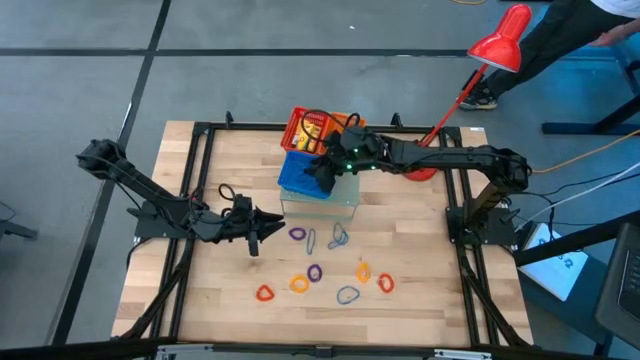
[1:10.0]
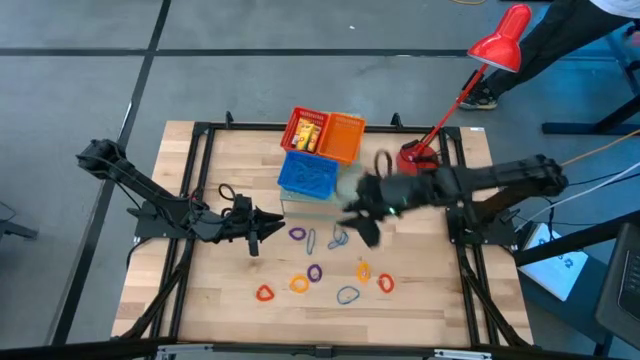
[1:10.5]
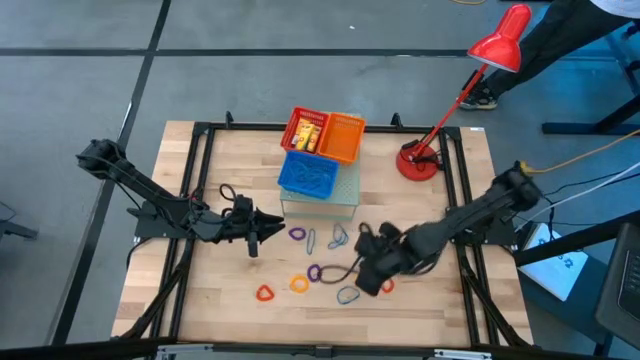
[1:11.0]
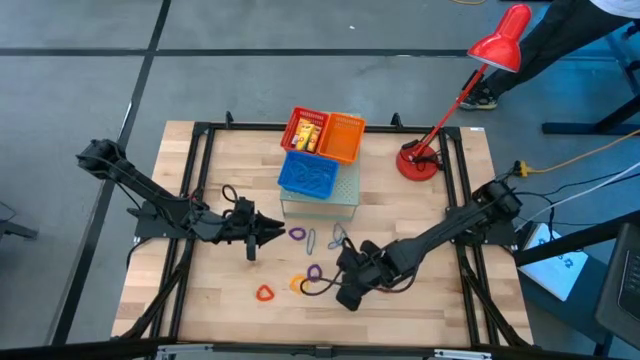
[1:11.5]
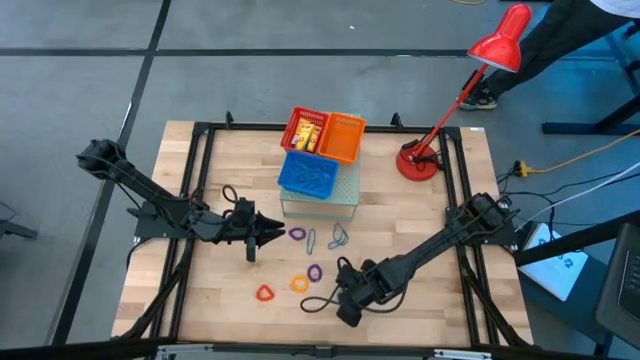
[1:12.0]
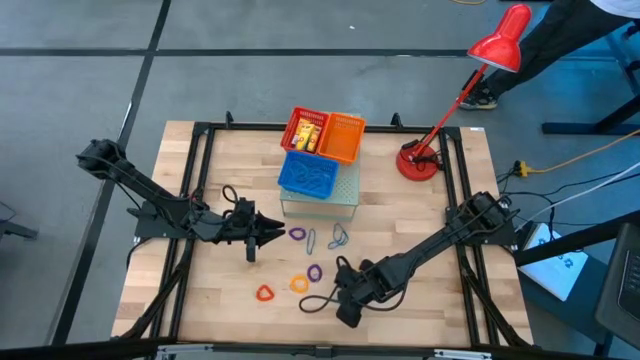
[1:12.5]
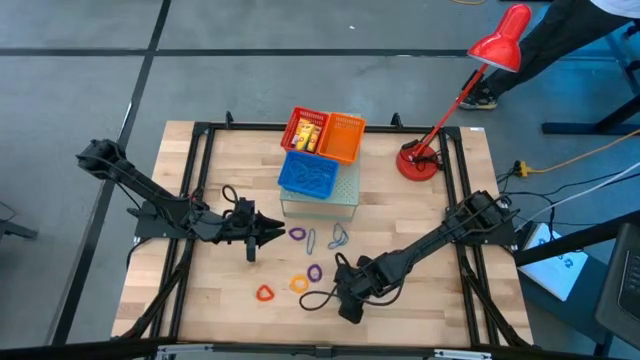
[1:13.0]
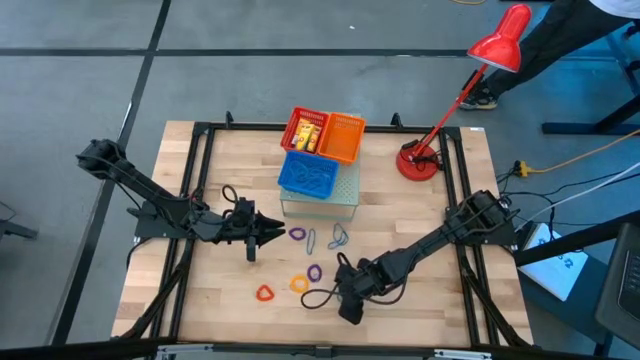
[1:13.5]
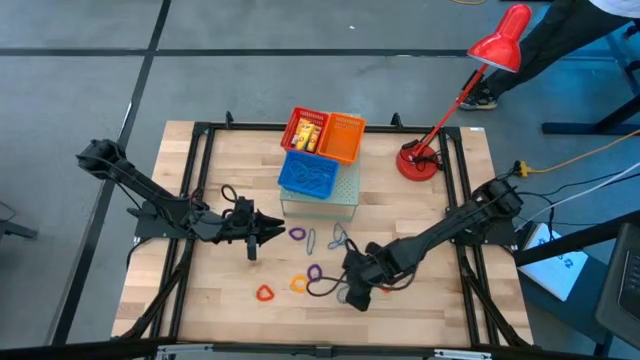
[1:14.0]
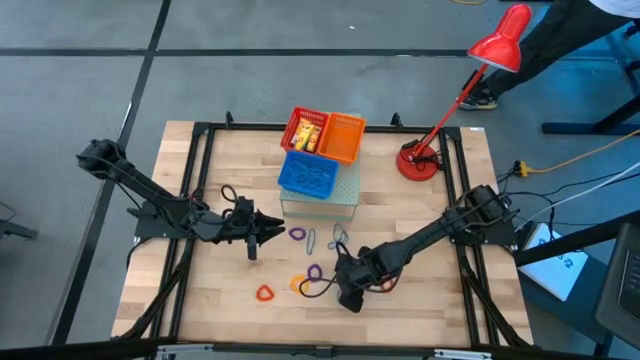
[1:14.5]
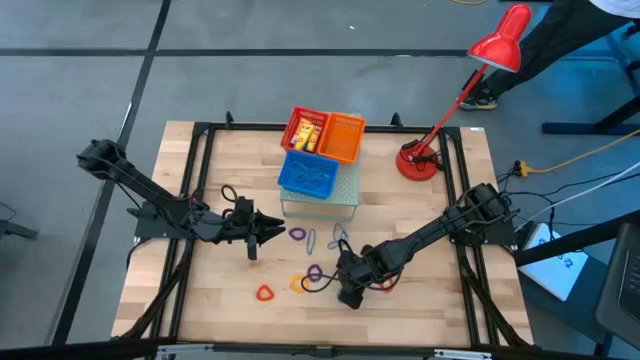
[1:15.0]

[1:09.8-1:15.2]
Task: Pick & Place Office Desk Supplies
Put the blue rubber band into the blue basket on the shelf

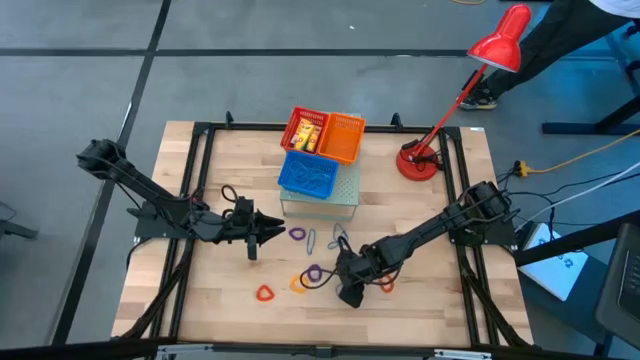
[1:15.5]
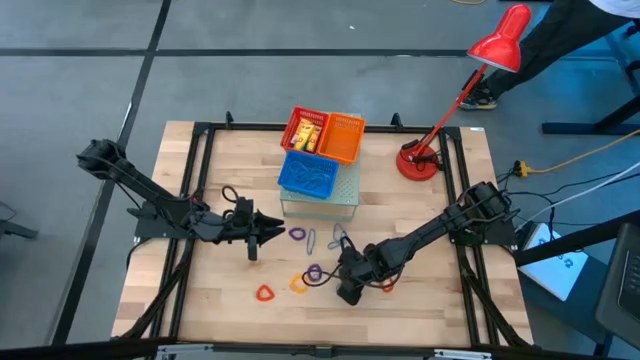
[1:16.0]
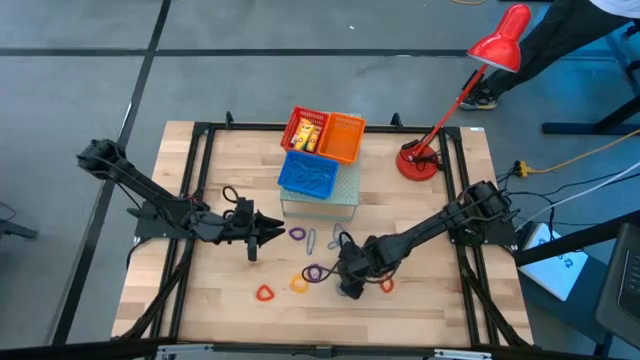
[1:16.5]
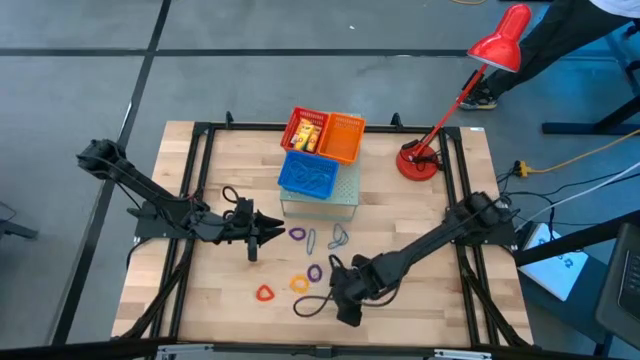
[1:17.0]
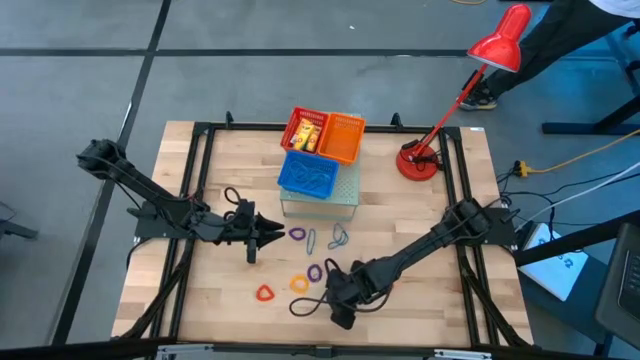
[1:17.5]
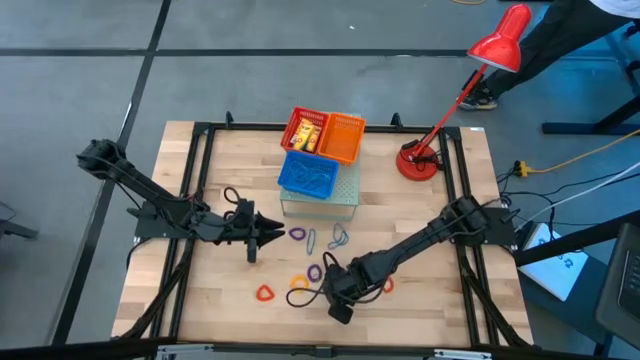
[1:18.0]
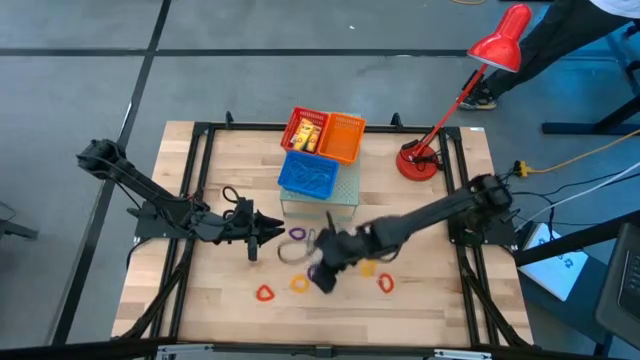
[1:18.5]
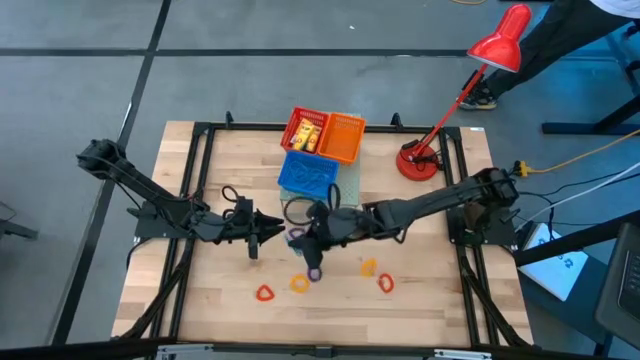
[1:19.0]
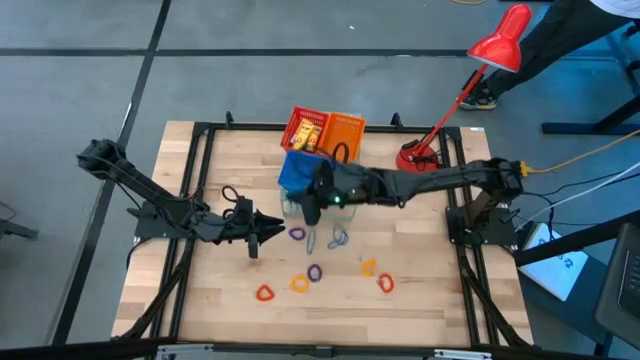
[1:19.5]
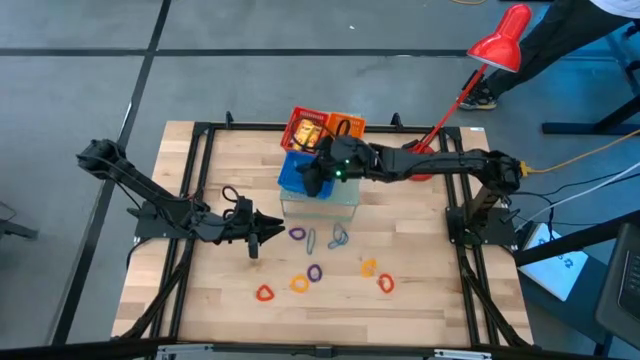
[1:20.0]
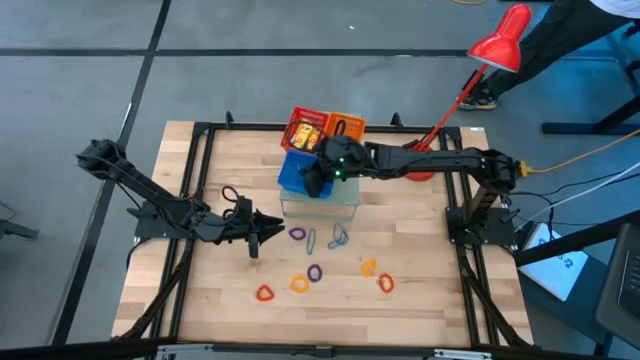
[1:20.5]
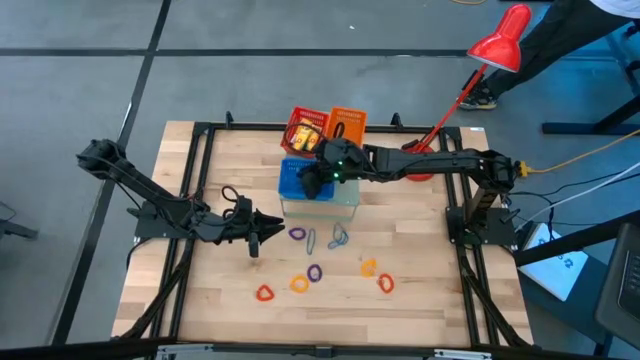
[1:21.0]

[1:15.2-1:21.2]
Put the blue rubber band into the blue basket on the shelf

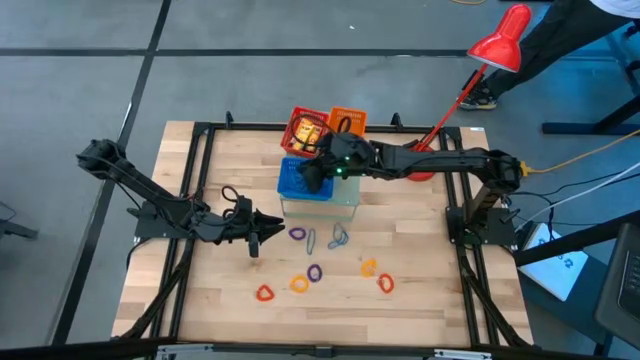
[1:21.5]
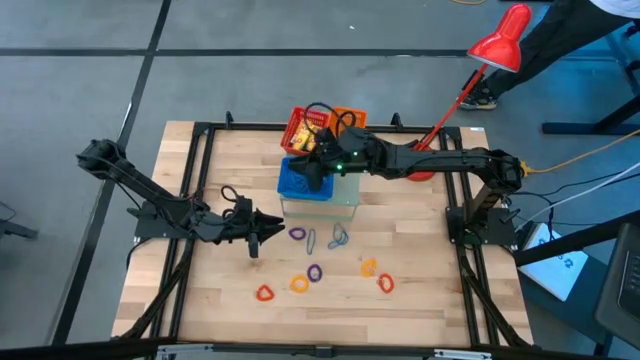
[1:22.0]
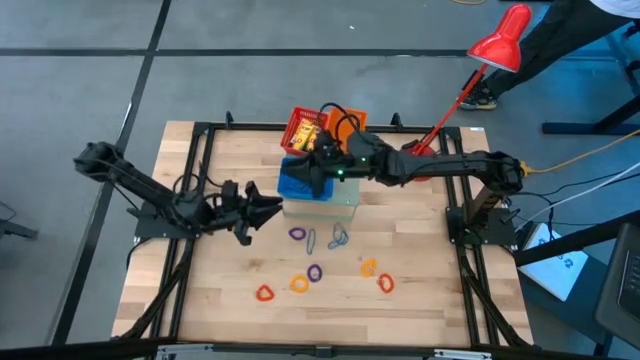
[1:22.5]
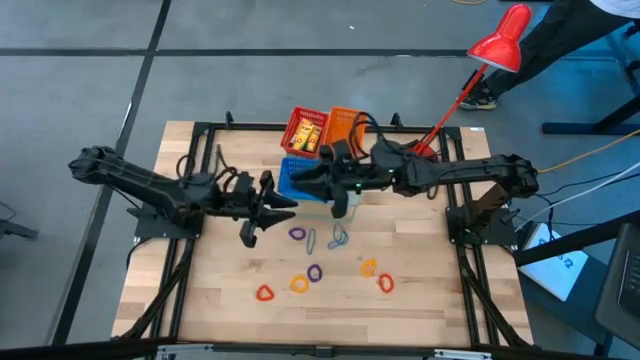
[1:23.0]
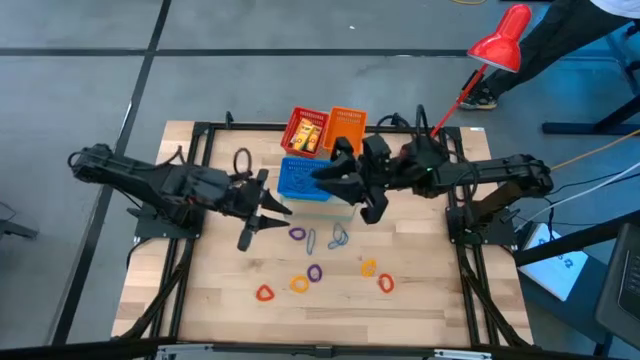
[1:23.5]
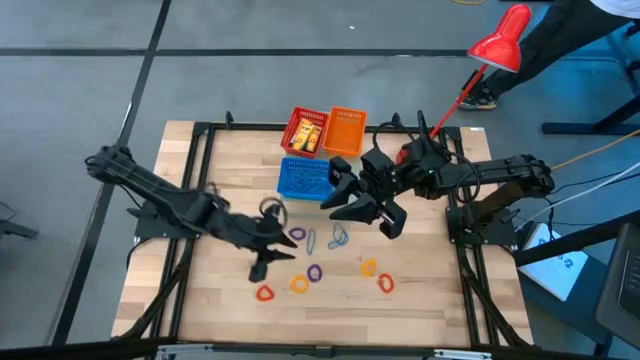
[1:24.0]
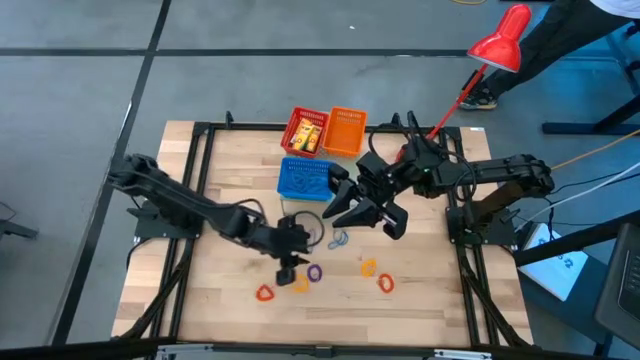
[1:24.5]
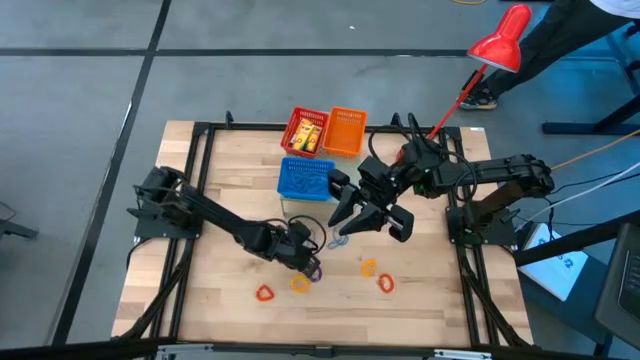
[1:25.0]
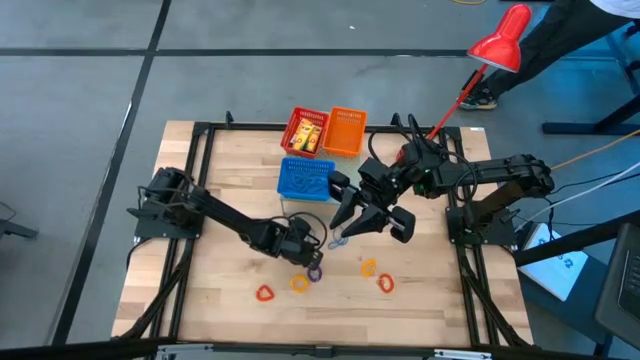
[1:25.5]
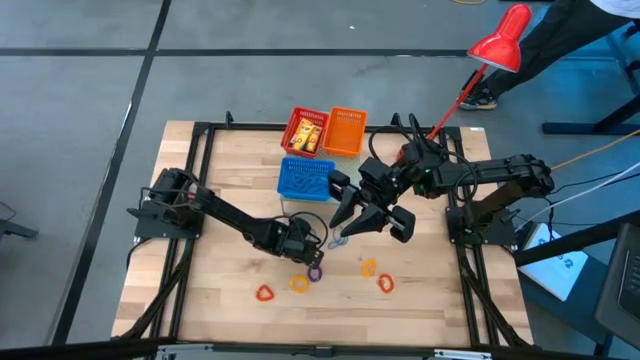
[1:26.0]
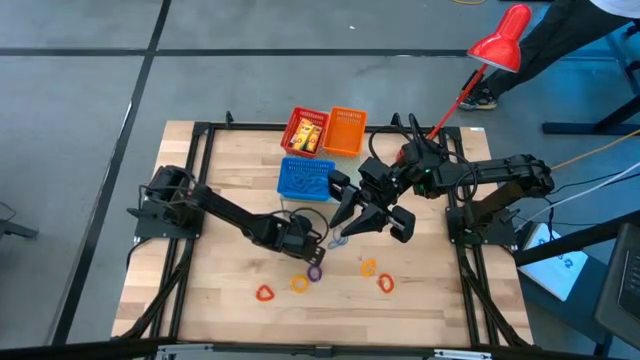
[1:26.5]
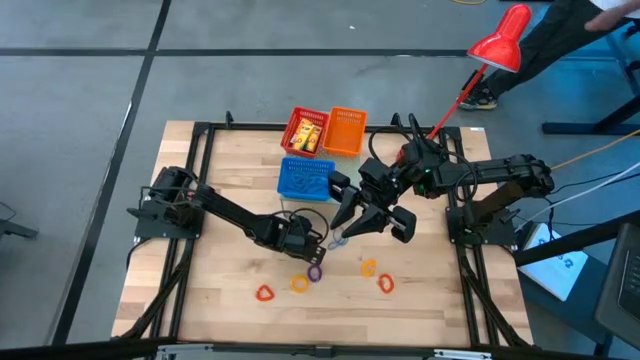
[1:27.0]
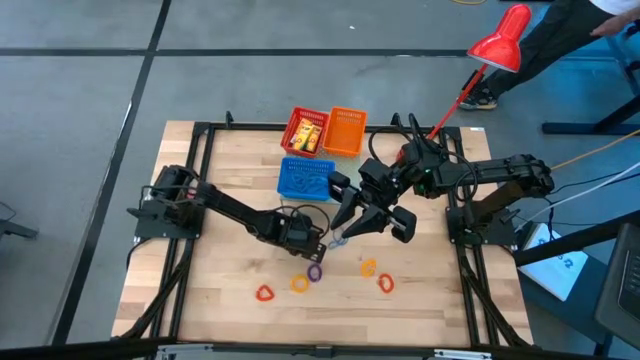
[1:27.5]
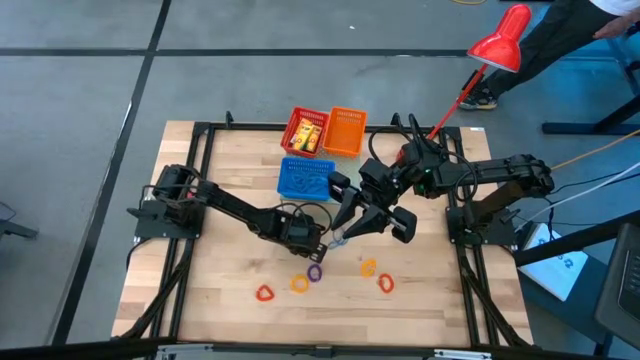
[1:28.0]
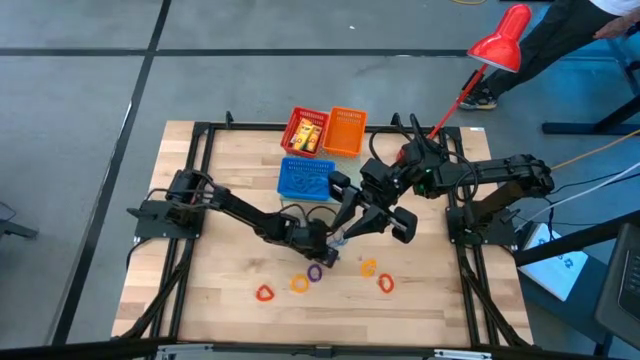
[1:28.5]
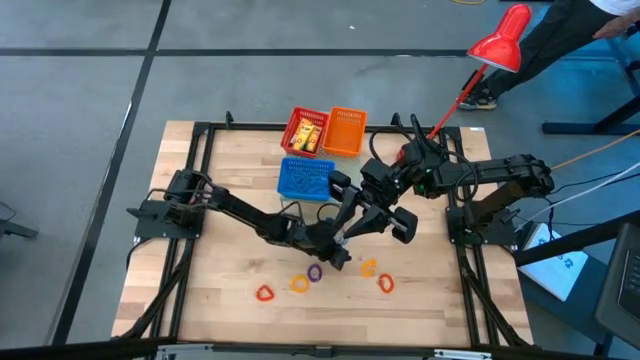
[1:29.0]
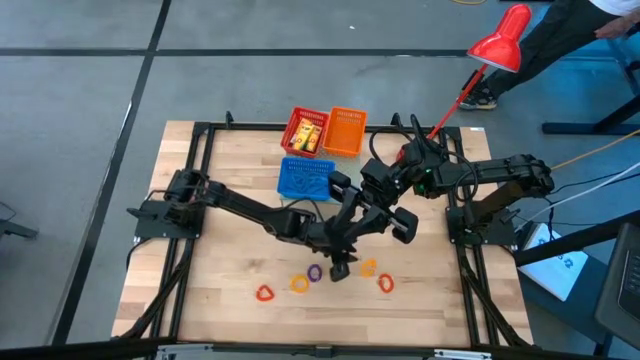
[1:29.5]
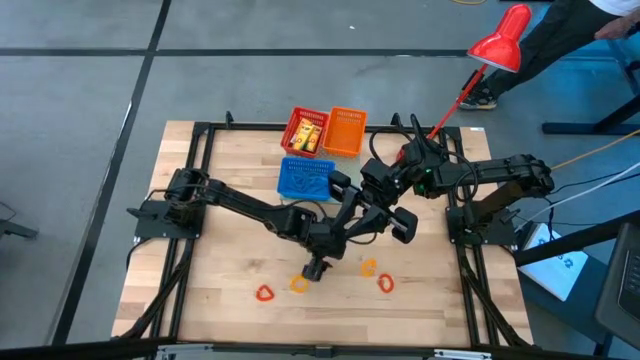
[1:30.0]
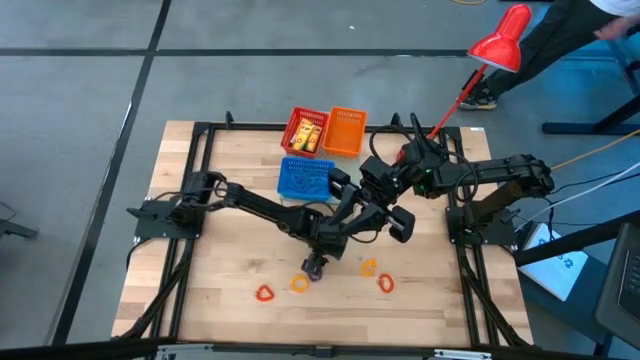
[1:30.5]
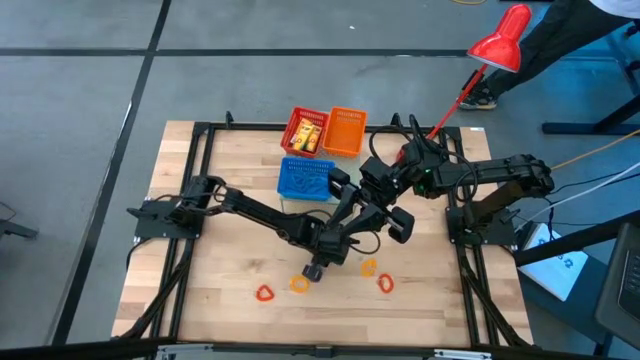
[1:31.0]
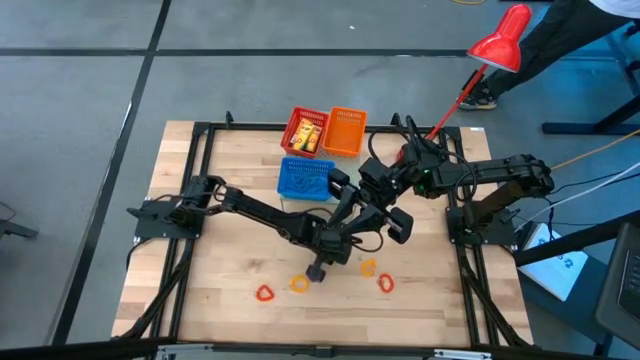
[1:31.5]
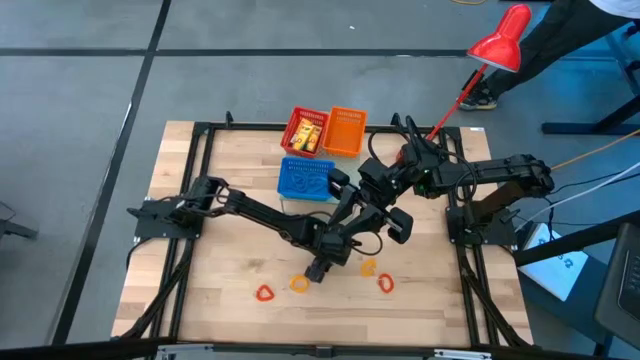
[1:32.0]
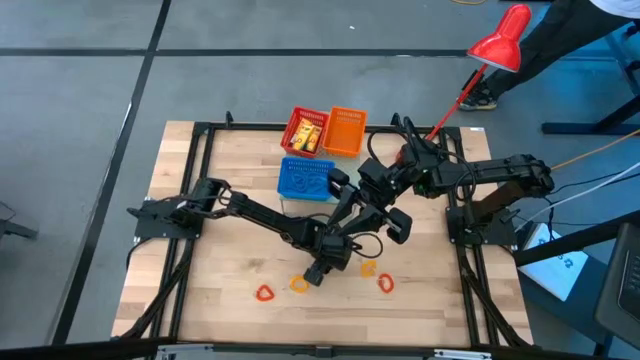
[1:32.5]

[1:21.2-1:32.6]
Put the blue rubber band into the blue basket on the shelf
